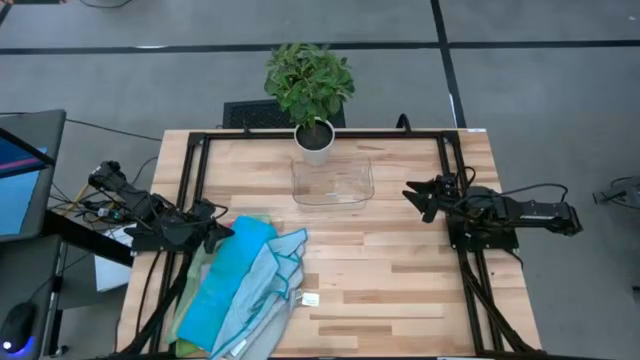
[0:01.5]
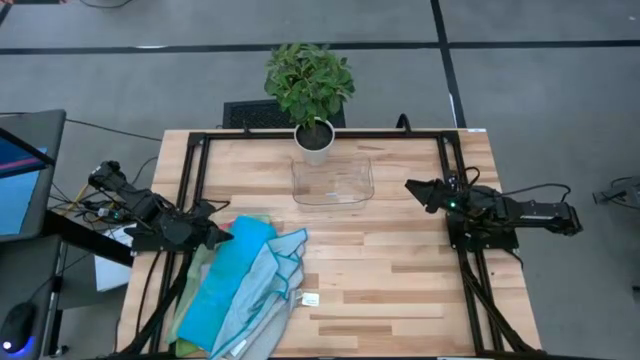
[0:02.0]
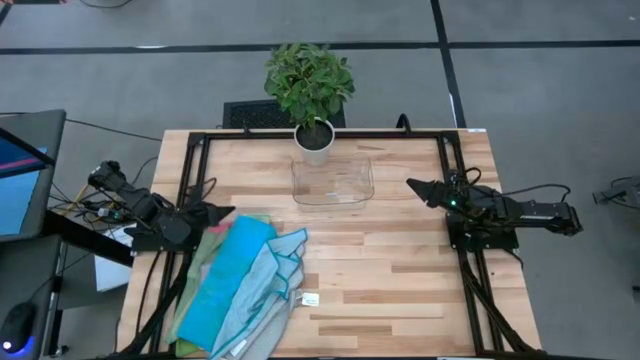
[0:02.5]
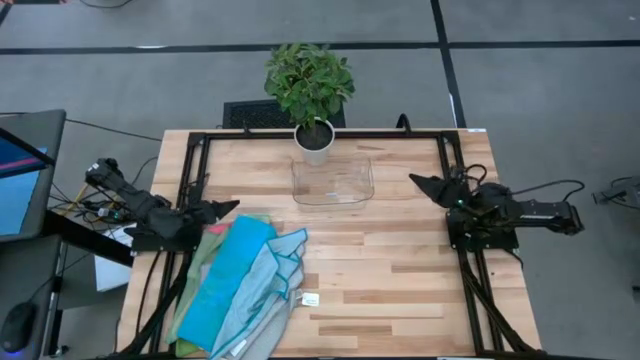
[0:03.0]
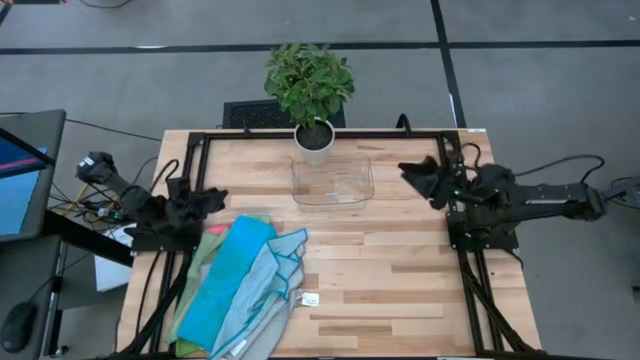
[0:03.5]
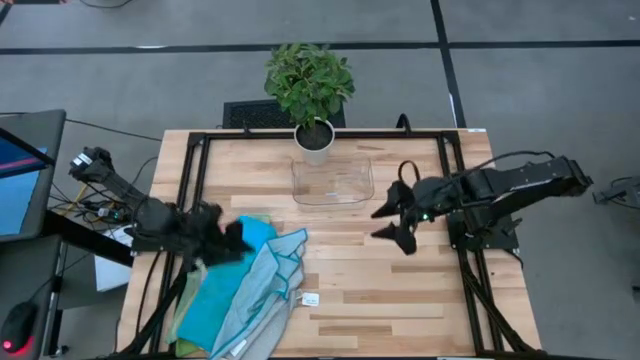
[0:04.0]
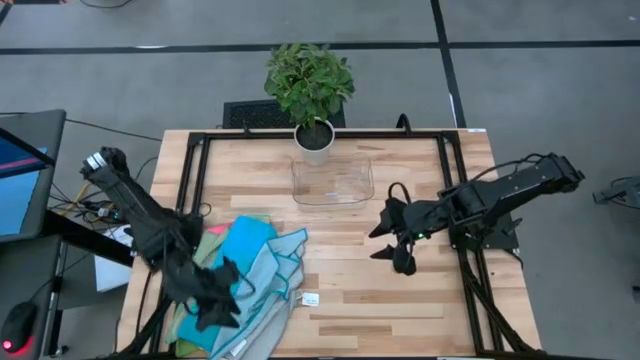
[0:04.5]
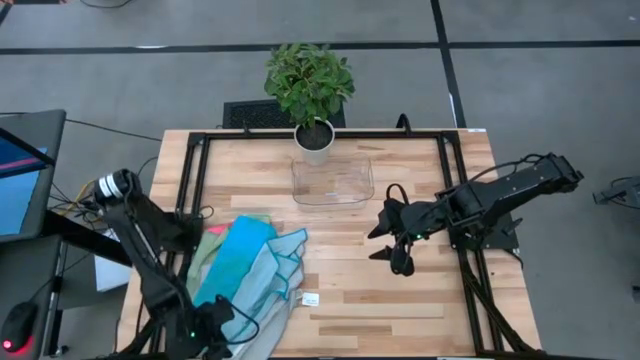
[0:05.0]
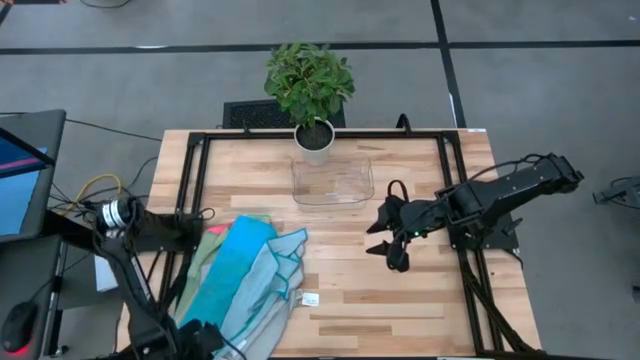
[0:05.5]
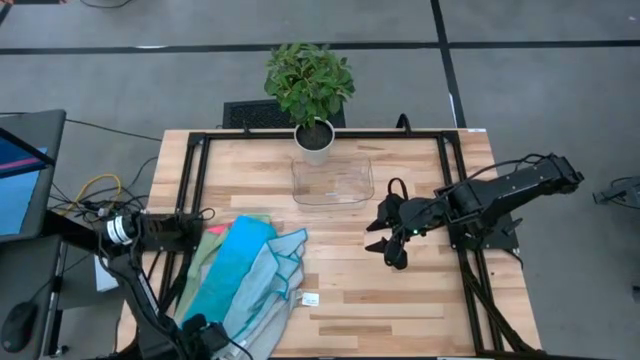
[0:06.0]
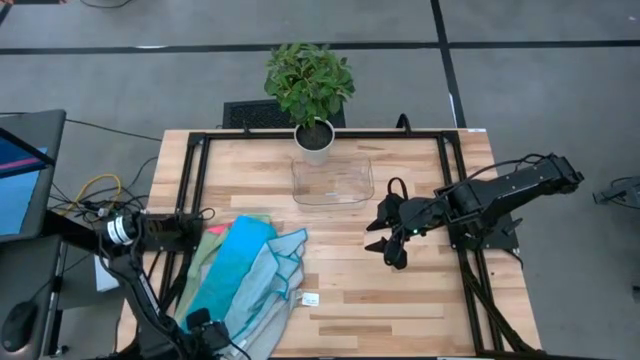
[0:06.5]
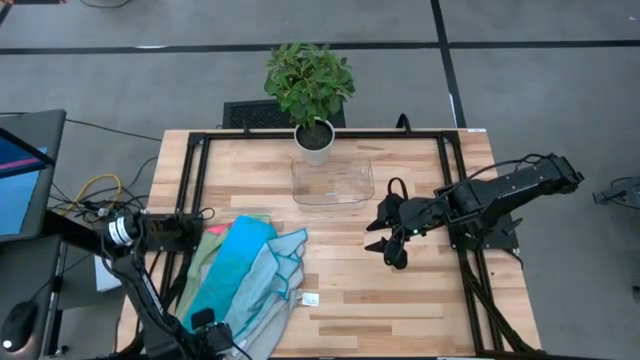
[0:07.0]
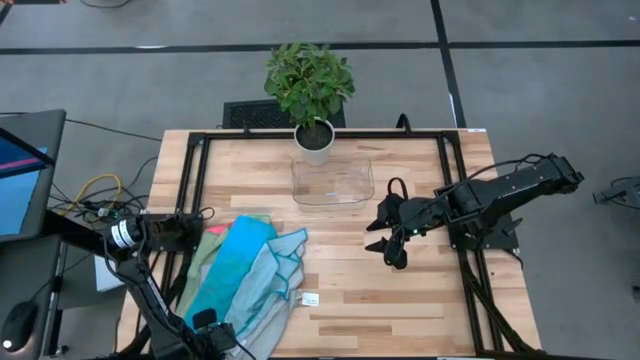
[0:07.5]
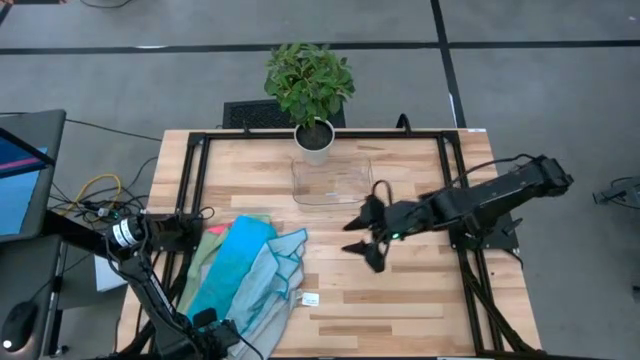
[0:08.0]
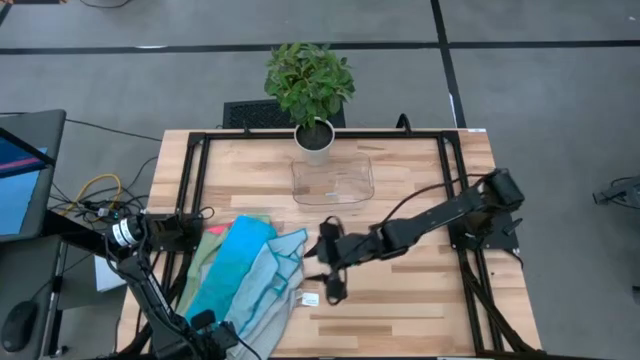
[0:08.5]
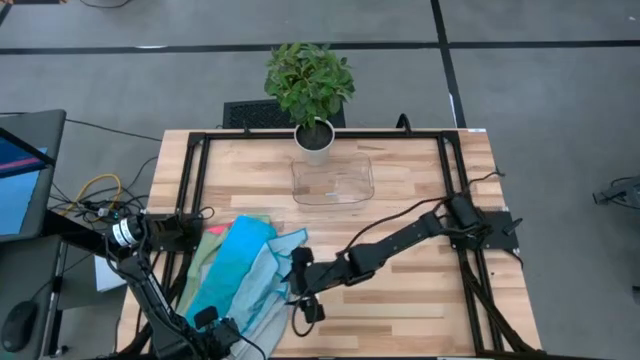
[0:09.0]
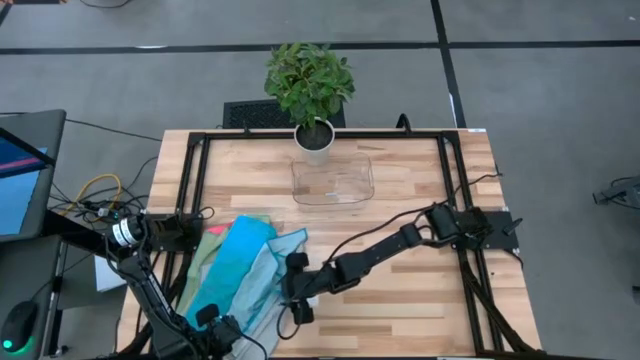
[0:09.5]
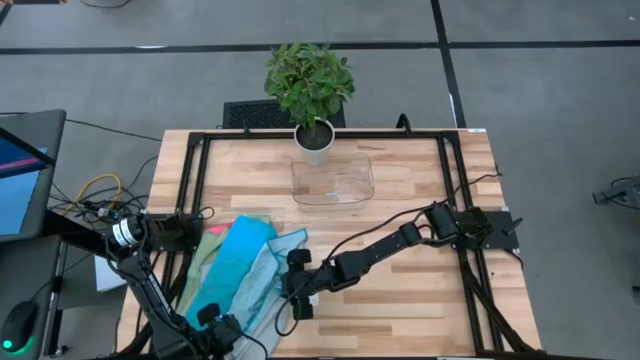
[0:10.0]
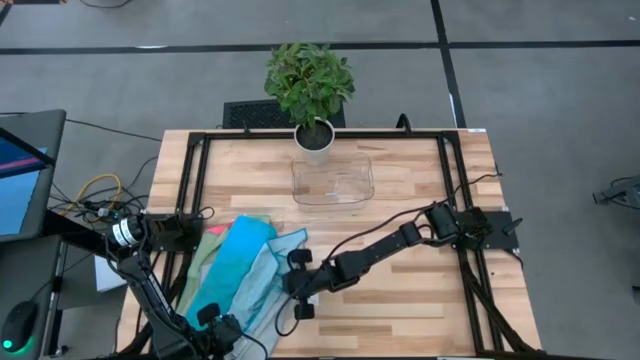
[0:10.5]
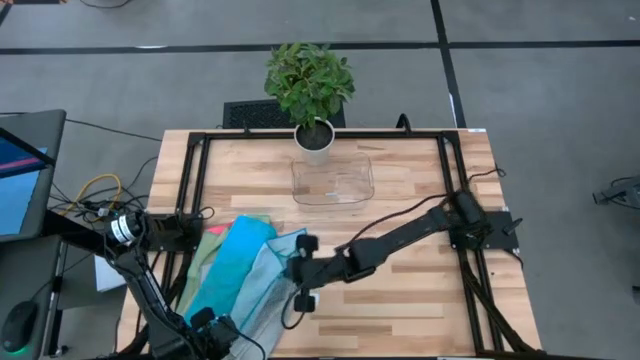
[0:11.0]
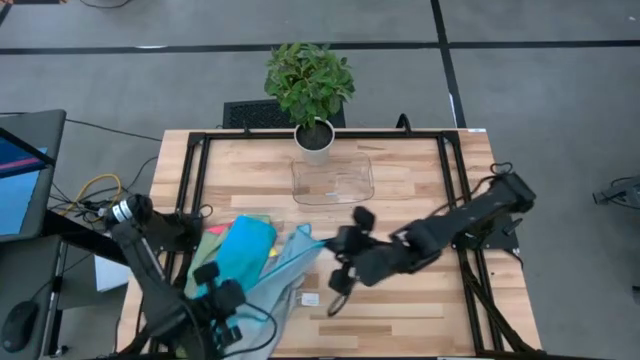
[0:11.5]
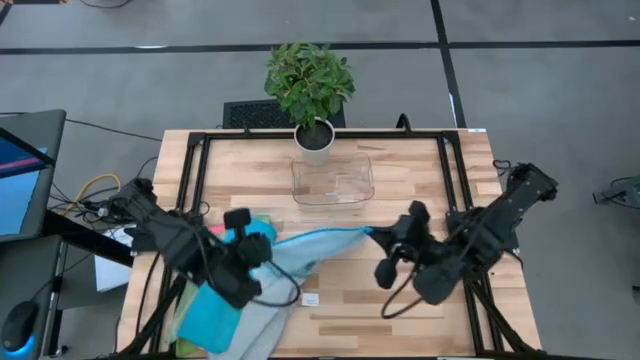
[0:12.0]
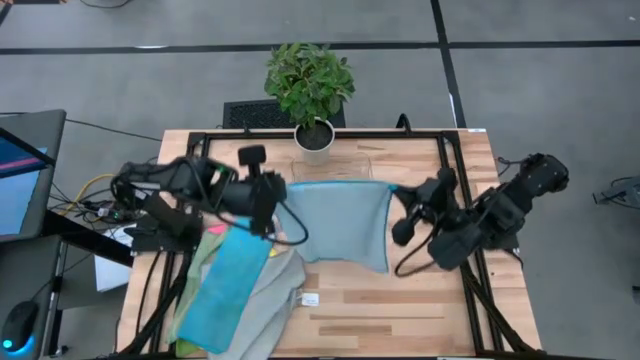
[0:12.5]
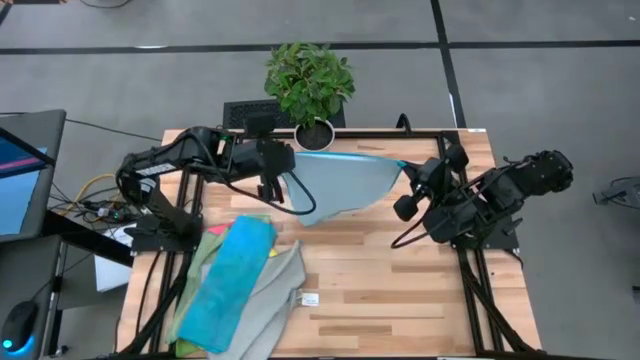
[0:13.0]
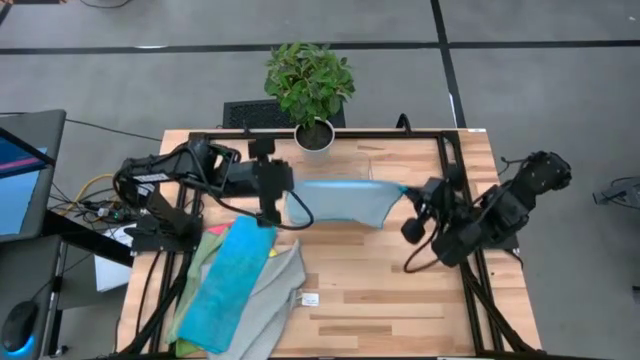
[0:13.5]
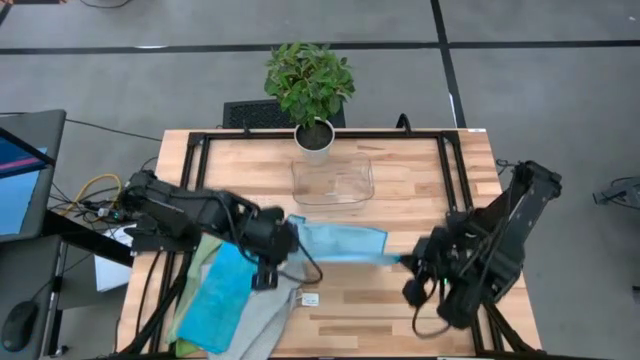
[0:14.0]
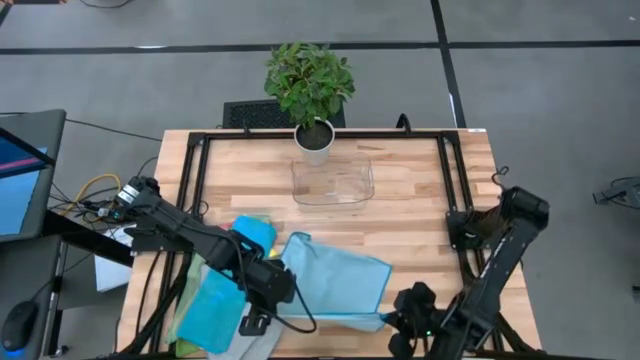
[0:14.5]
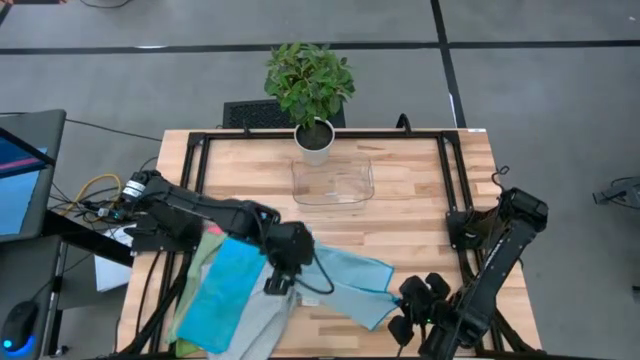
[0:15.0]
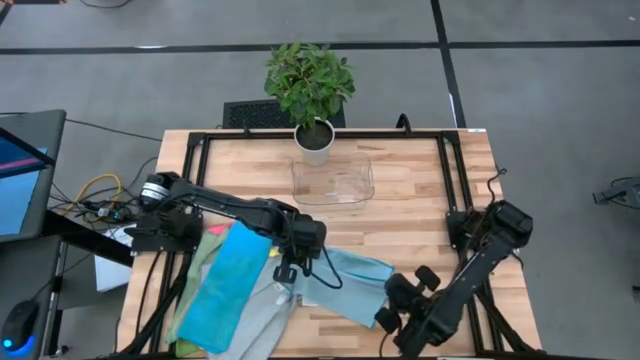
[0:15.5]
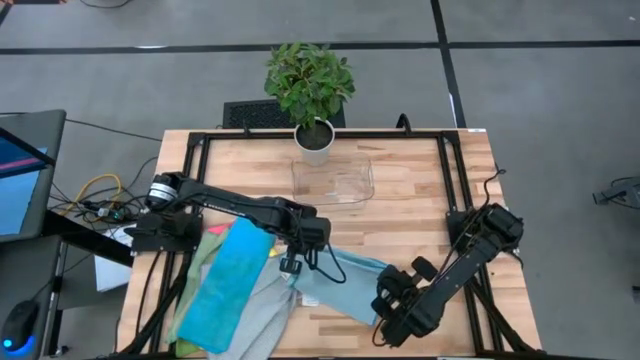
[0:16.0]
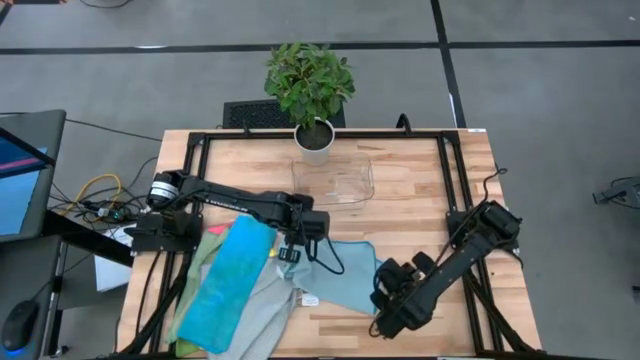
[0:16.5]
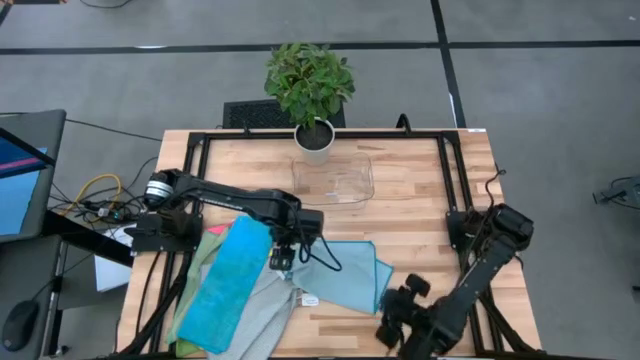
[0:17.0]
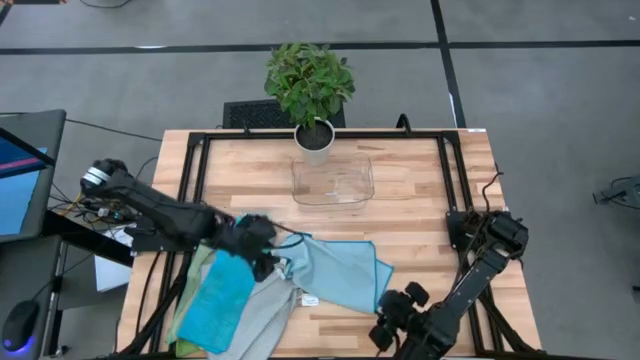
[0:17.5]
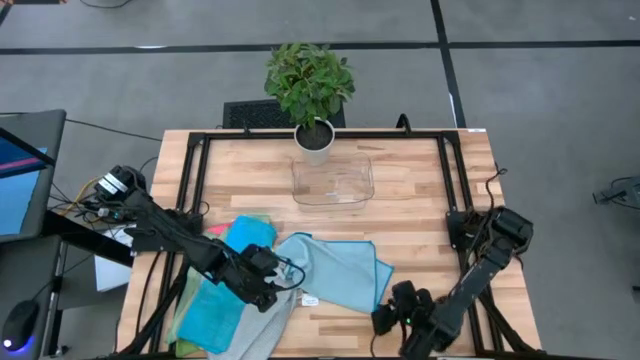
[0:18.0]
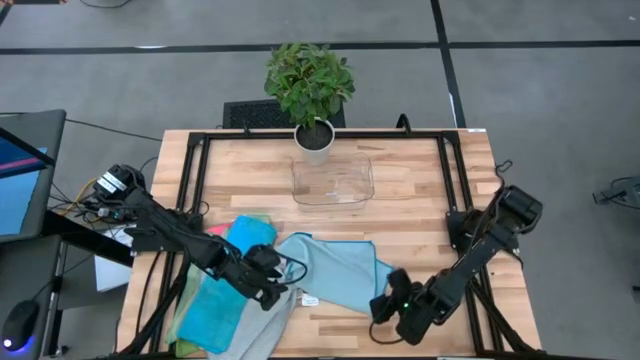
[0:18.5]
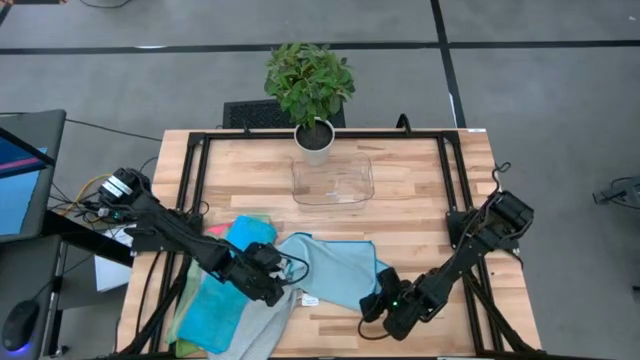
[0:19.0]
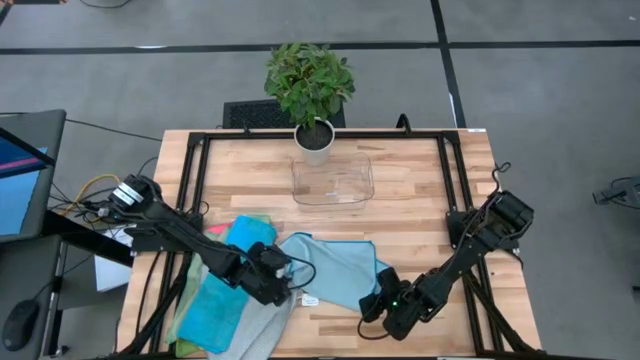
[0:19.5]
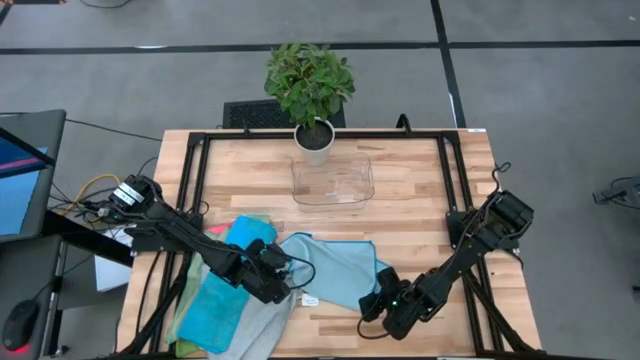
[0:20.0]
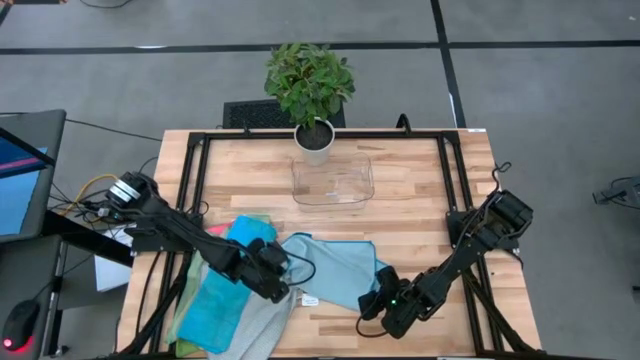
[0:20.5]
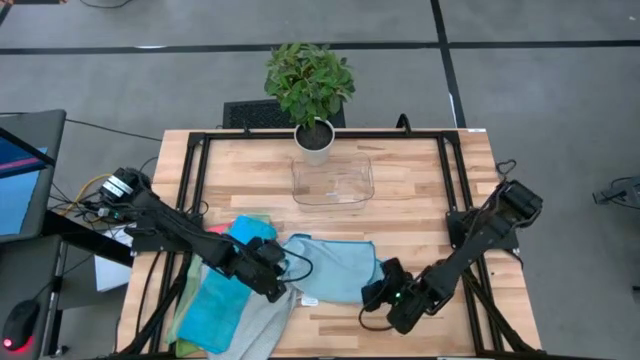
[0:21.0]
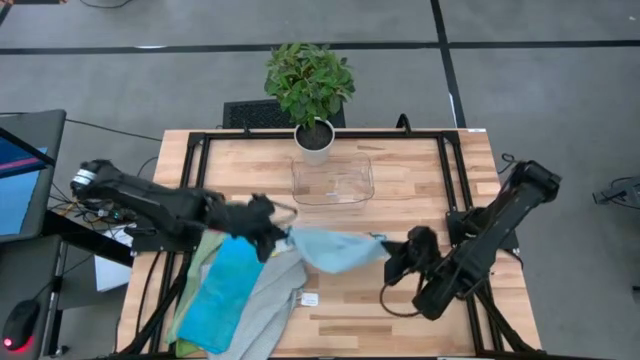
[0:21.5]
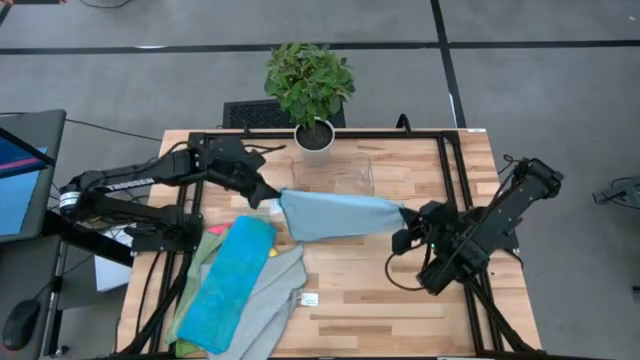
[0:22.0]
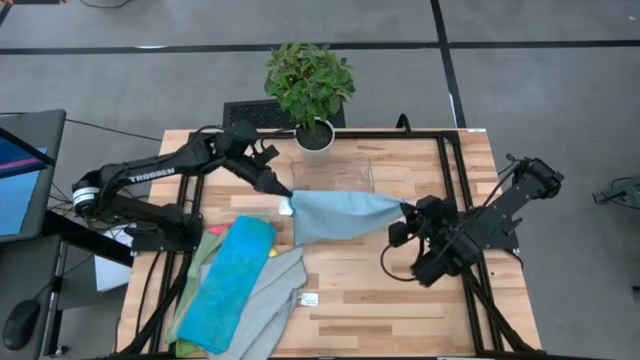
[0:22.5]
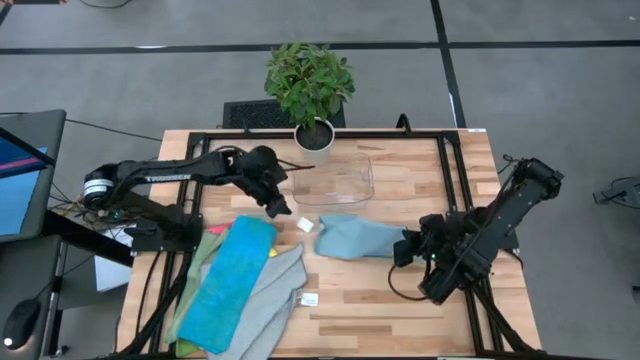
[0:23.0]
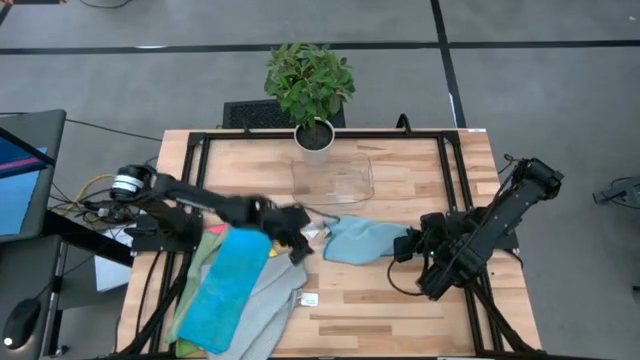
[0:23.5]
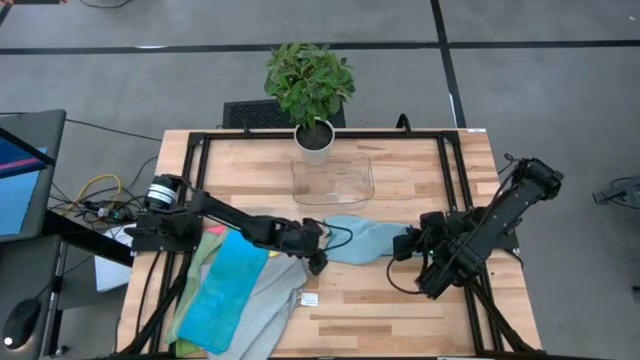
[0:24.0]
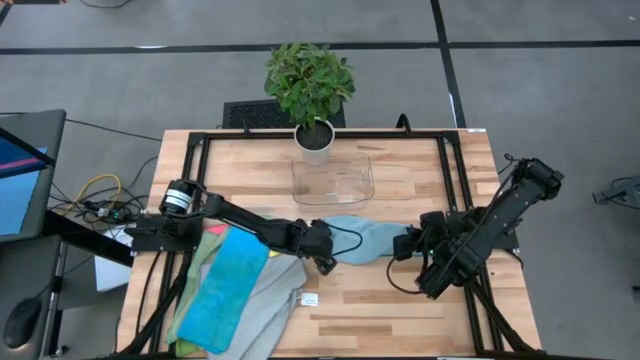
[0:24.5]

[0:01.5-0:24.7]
Task: Fold microfiber towels
Fold the light blue microfiber cloth
